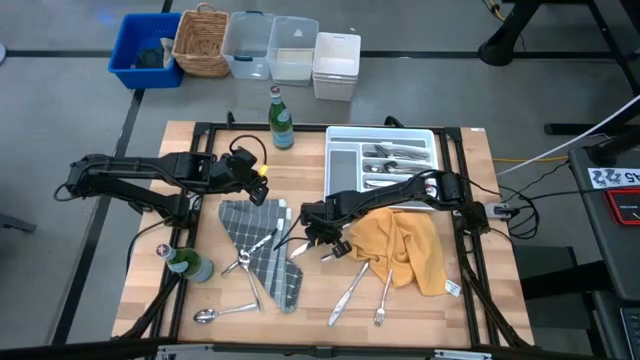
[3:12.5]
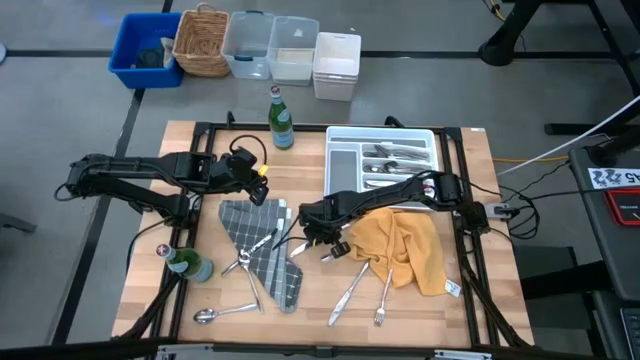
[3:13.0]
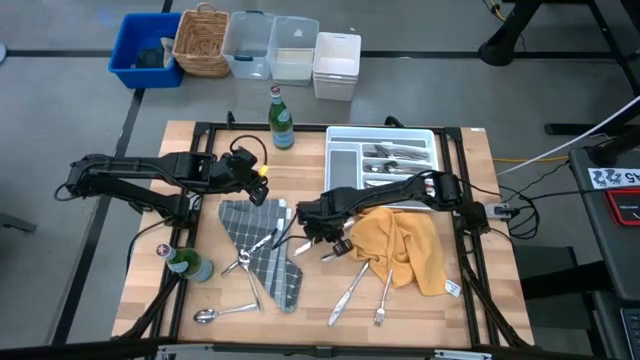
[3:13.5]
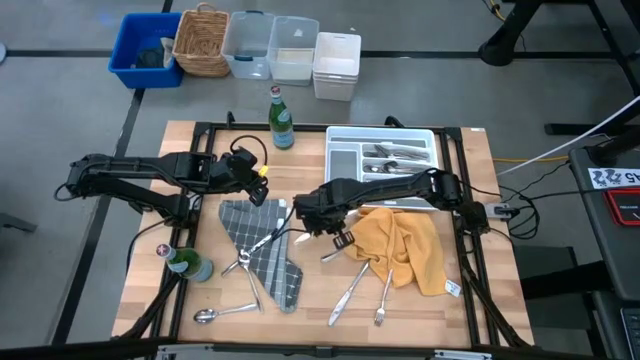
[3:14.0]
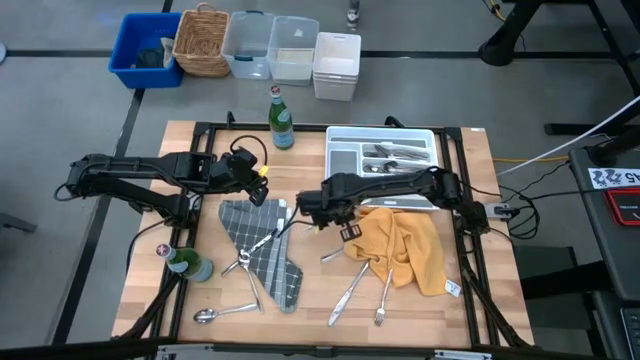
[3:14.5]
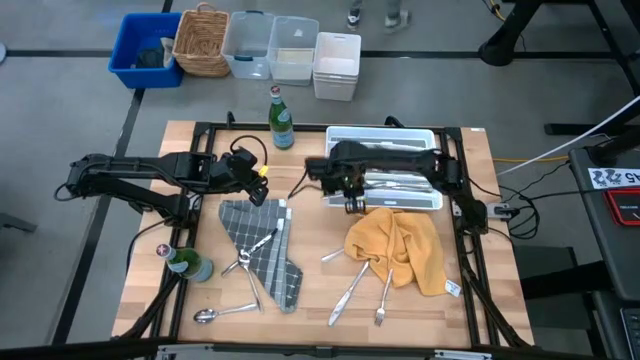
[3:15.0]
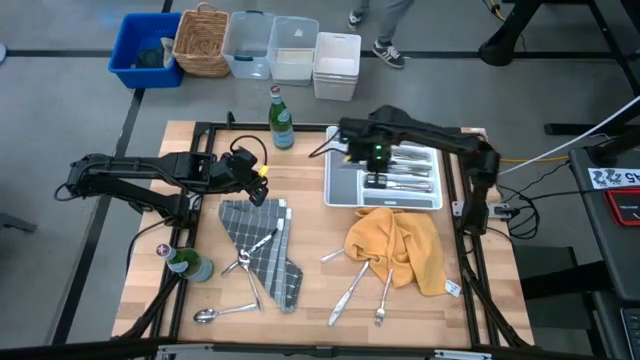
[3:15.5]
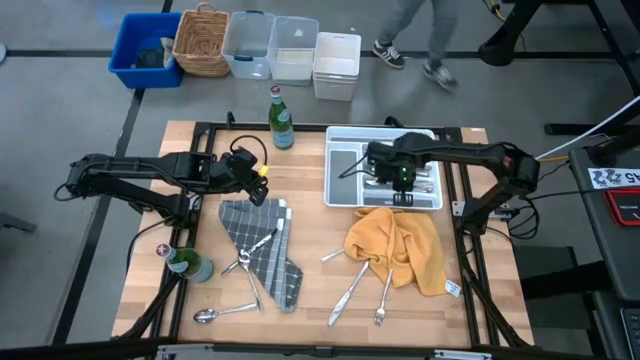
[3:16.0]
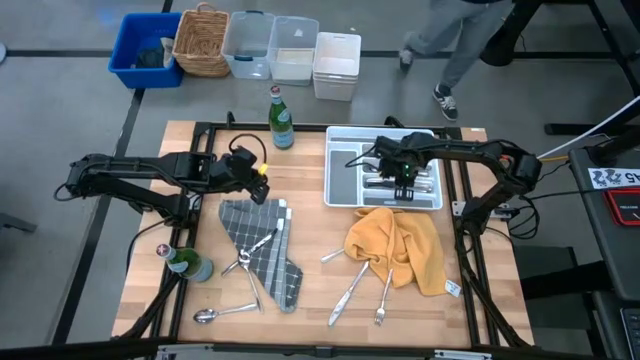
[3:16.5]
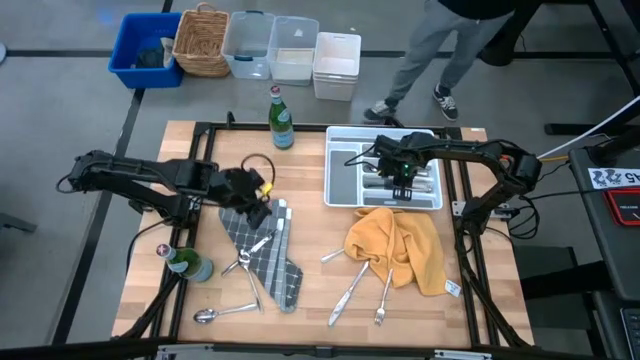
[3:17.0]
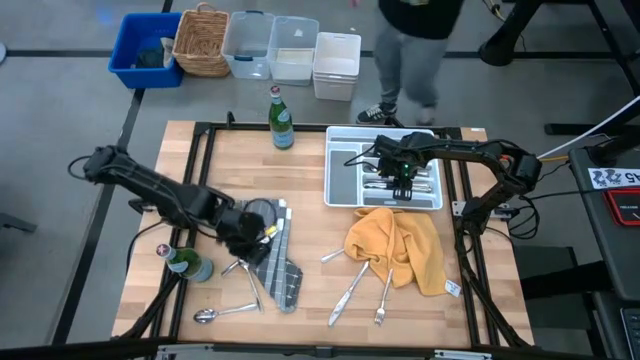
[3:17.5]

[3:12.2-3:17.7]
Put the silver knife into the cutlery tray

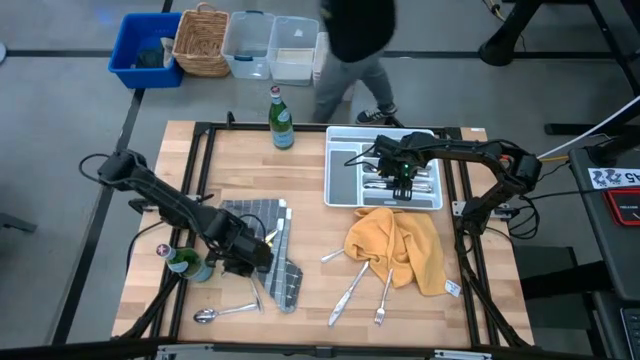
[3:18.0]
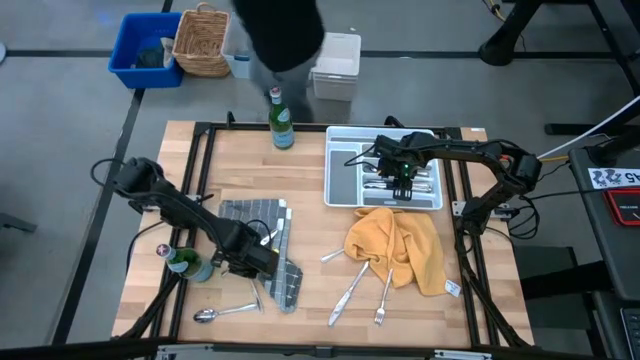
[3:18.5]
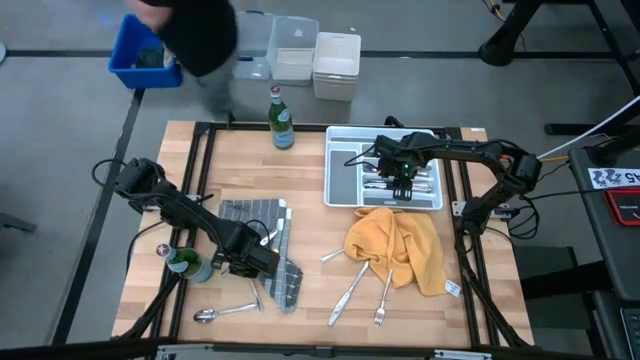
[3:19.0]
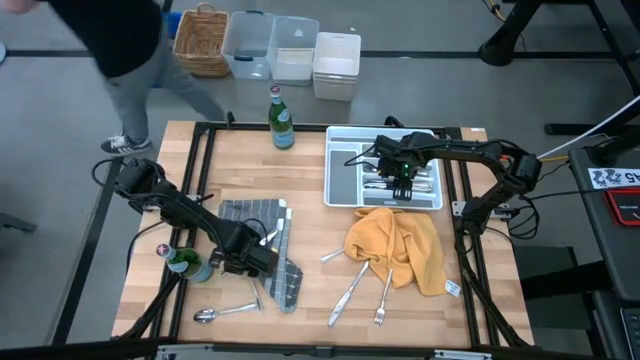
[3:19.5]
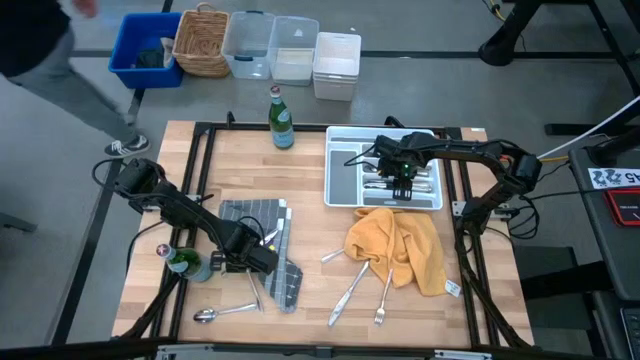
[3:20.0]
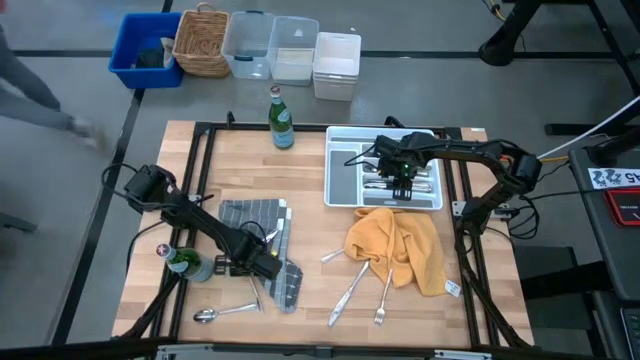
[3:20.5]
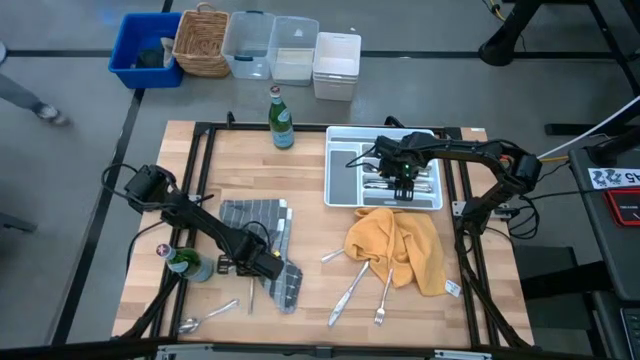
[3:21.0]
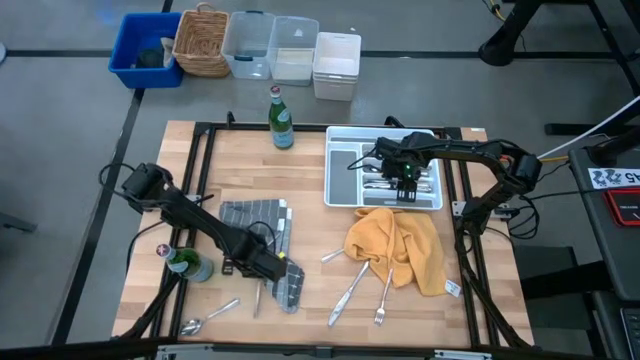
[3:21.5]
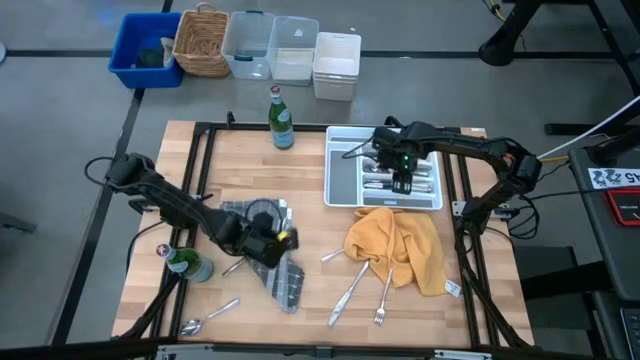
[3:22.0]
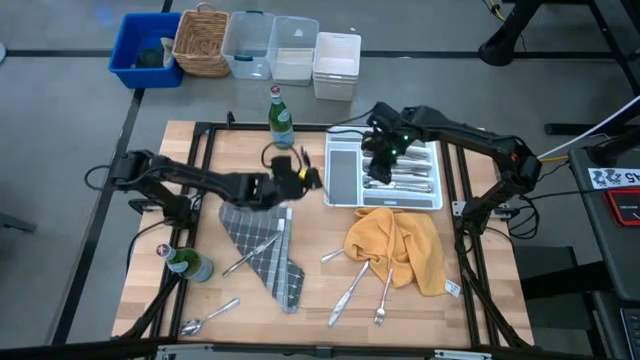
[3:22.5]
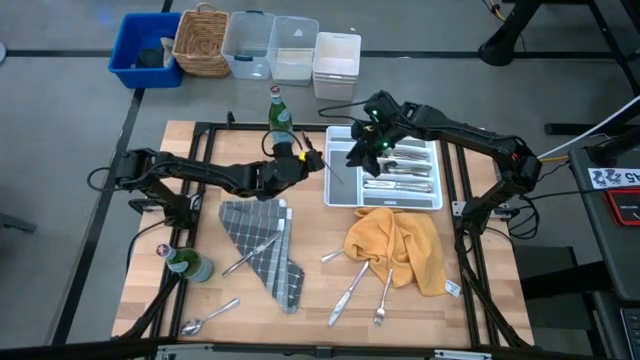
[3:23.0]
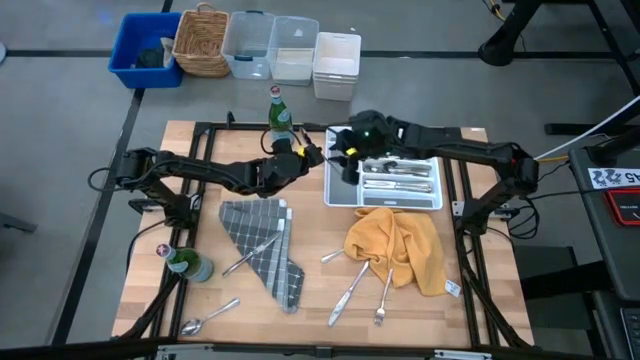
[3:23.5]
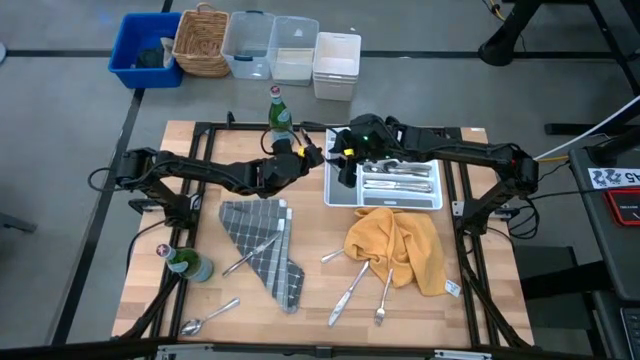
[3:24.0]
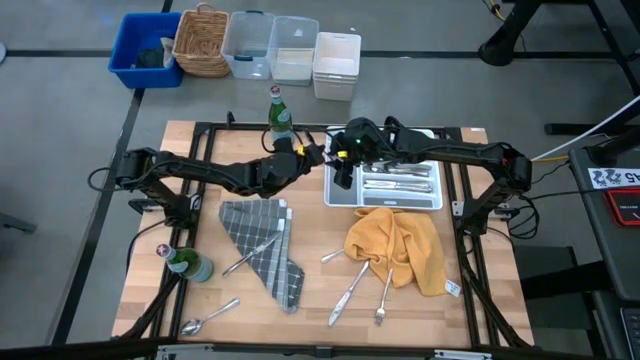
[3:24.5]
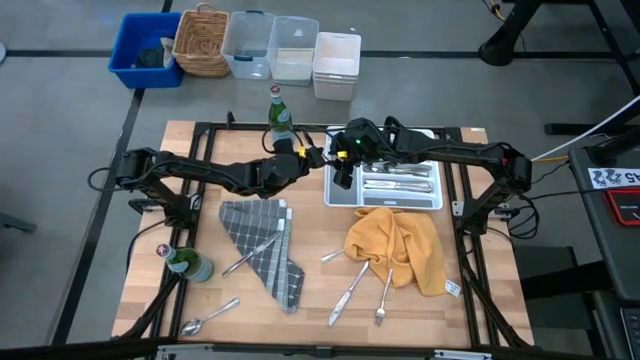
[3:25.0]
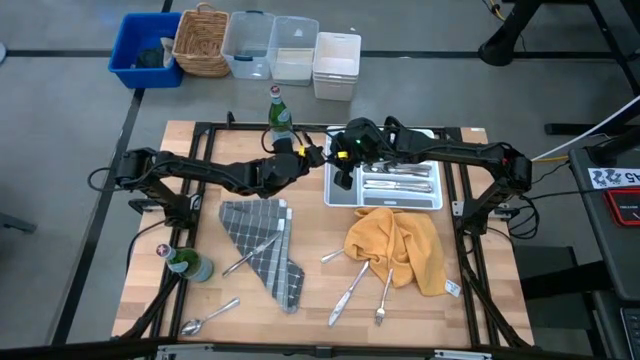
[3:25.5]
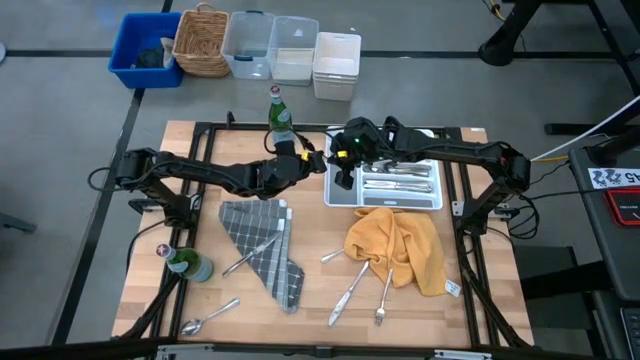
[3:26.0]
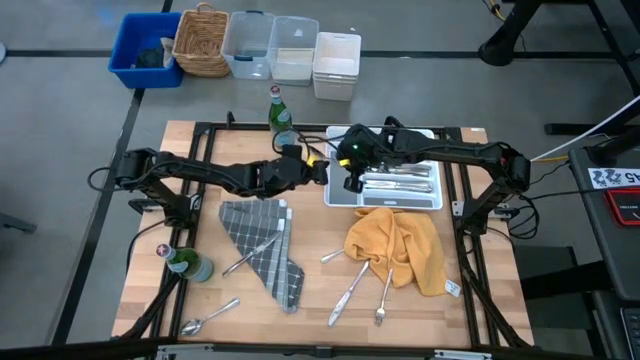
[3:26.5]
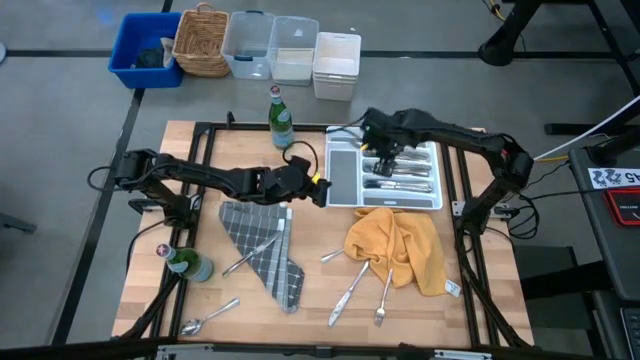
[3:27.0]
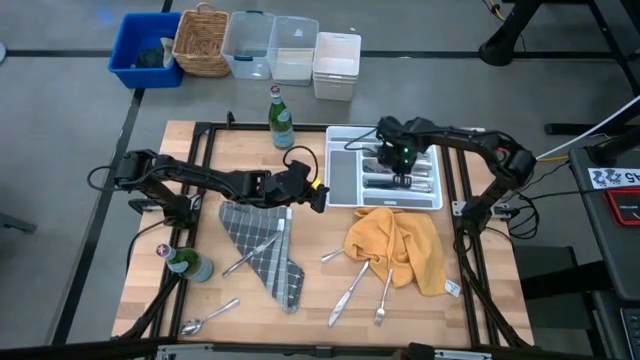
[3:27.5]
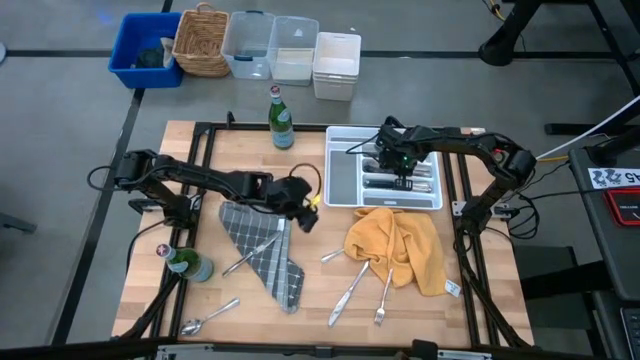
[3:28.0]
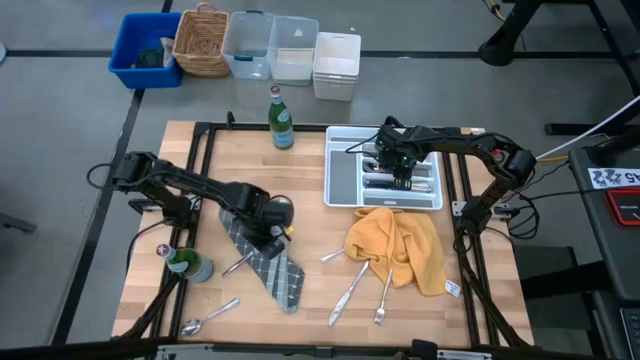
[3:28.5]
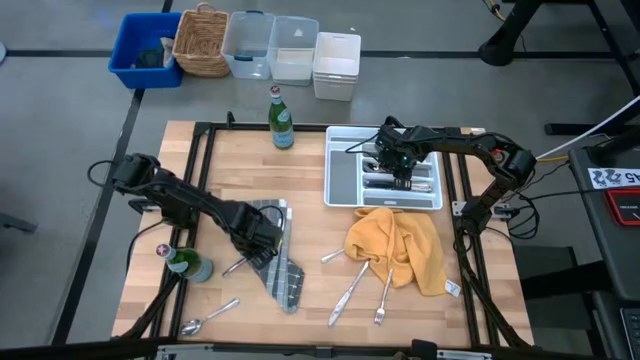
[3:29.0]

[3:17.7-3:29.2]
Put the silver spoon into the cutlery tray

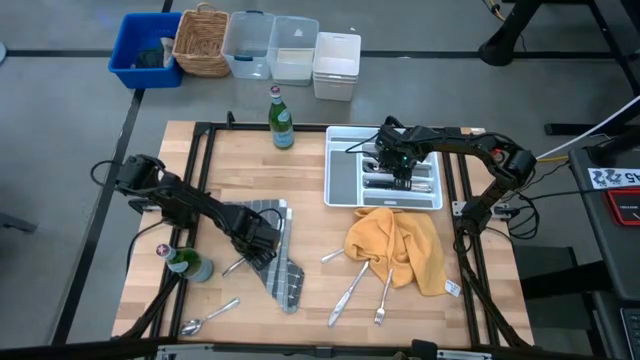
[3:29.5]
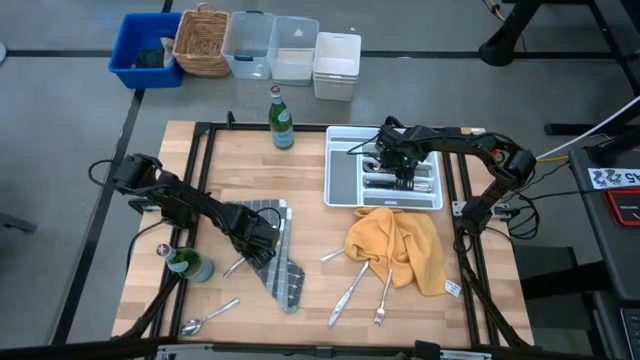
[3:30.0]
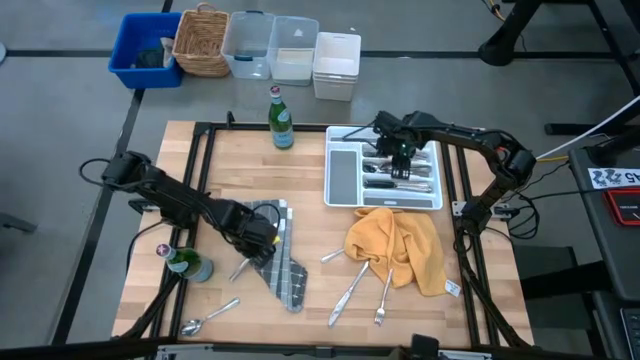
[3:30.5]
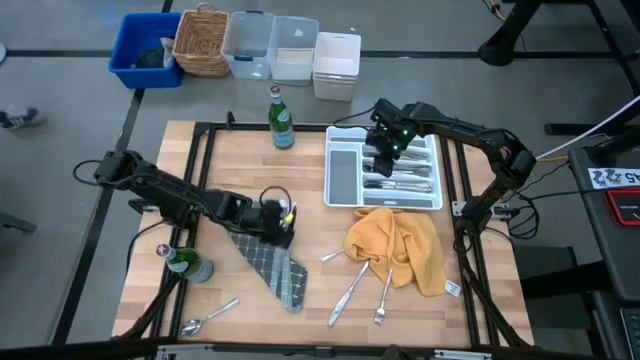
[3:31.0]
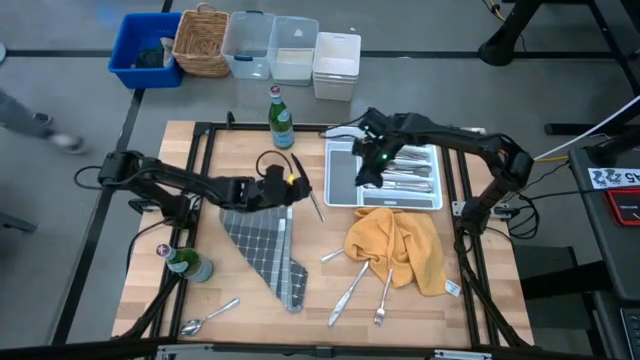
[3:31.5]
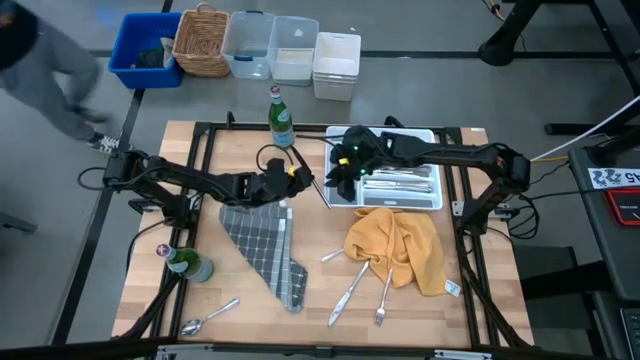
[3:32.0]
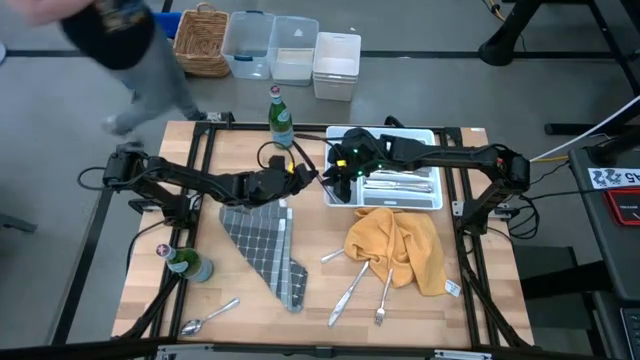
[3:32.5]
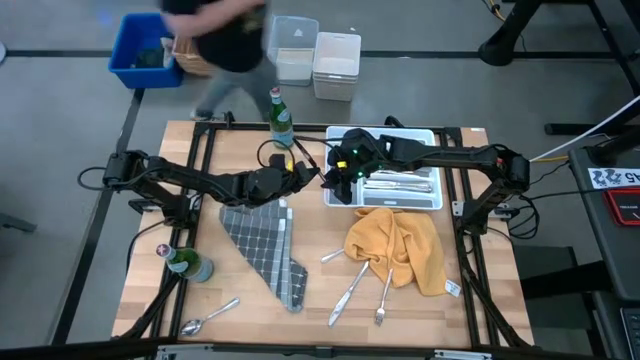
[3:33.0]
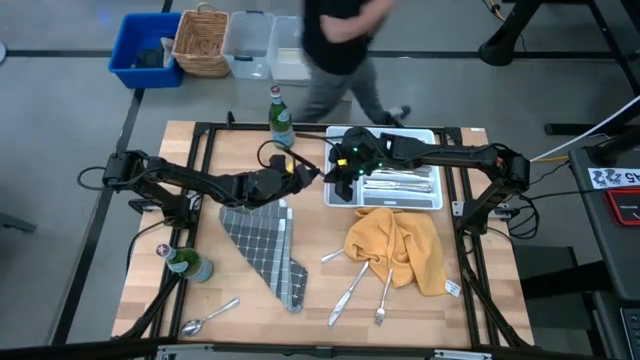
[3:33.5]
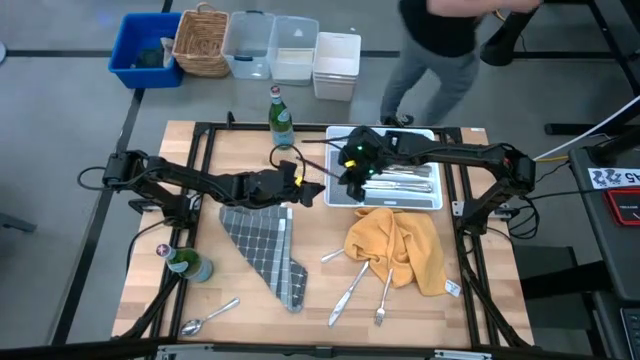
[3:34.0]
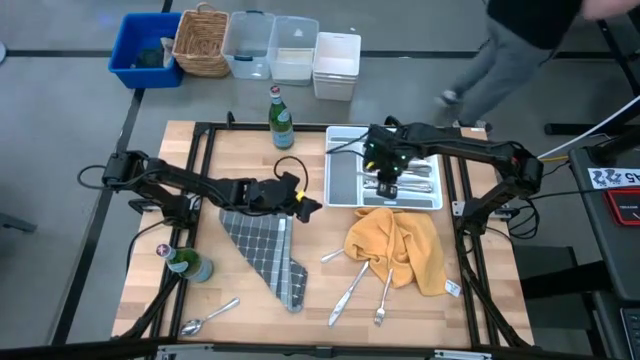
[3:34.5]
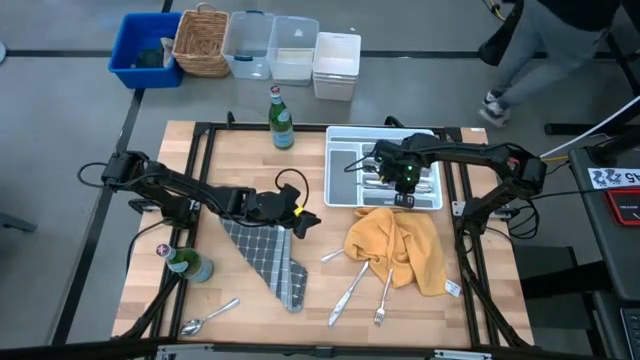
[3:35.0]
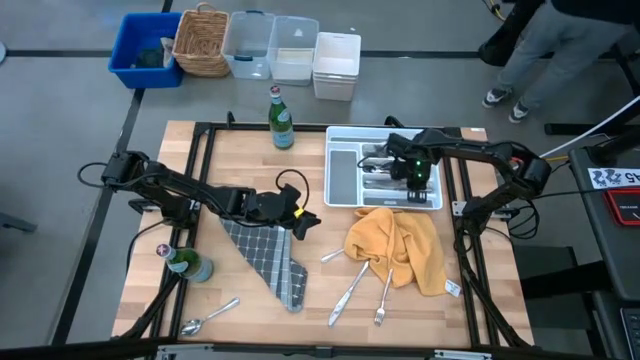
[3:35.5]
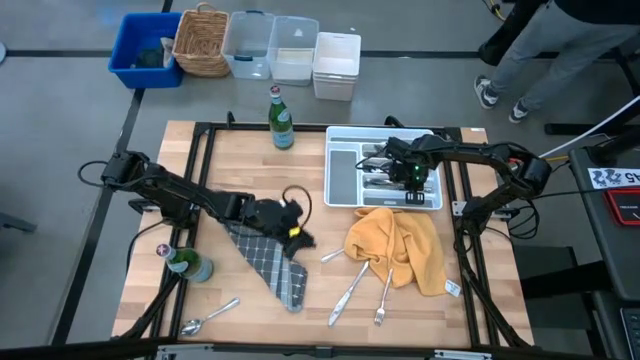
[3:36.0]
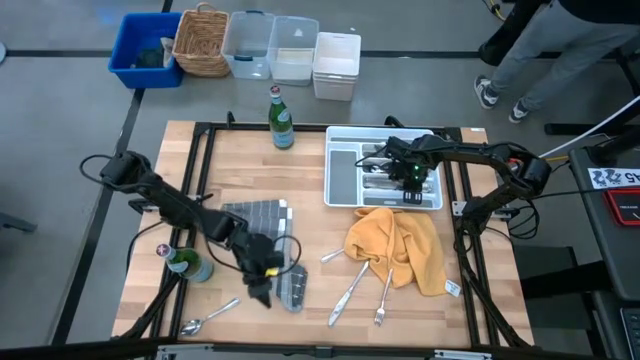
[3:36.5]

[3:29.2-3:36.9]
Put the silver knife into the cutlery tray
